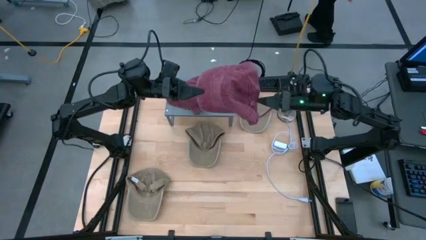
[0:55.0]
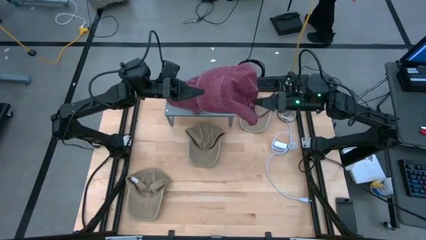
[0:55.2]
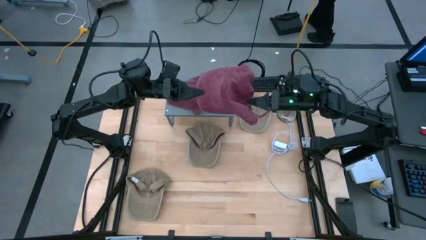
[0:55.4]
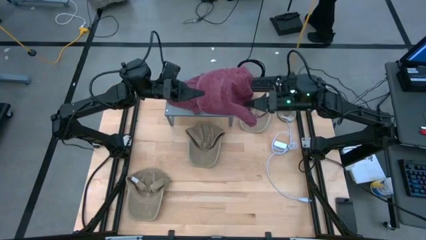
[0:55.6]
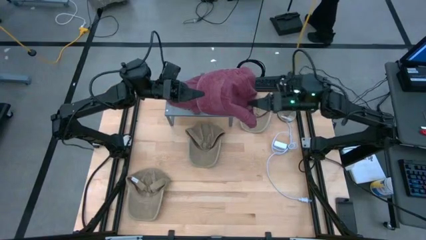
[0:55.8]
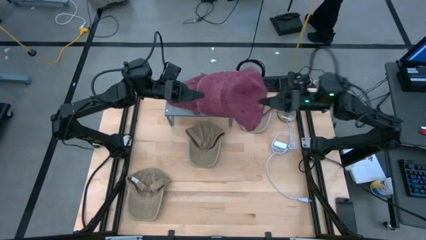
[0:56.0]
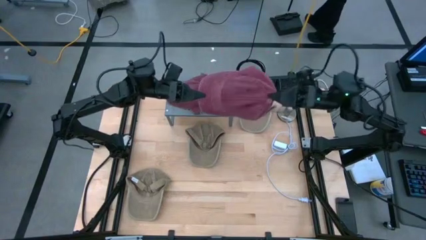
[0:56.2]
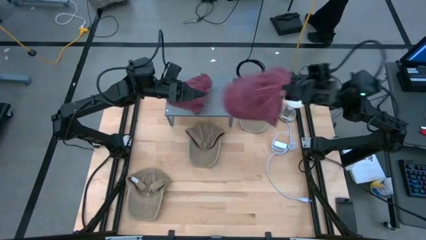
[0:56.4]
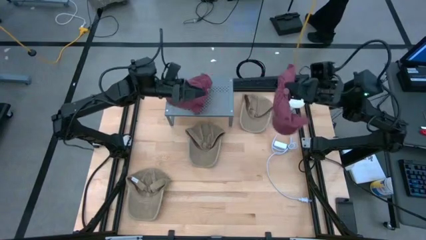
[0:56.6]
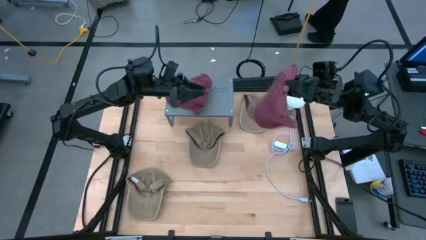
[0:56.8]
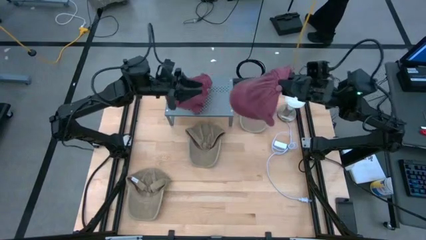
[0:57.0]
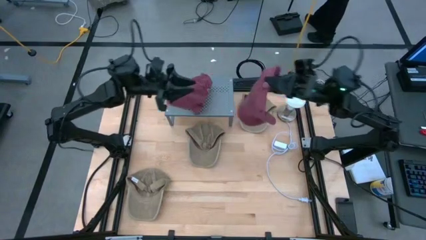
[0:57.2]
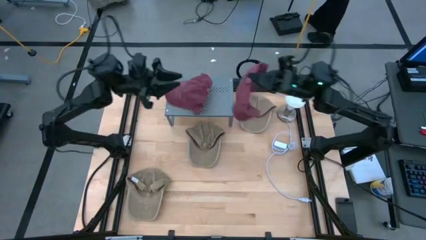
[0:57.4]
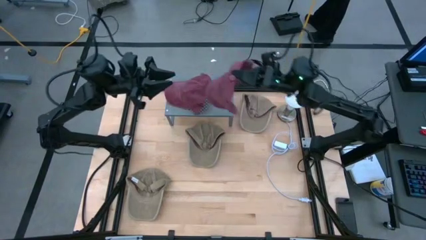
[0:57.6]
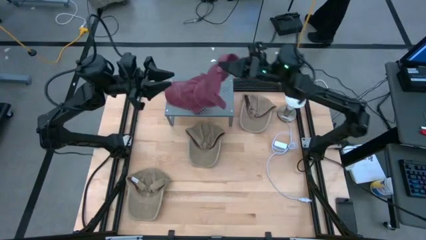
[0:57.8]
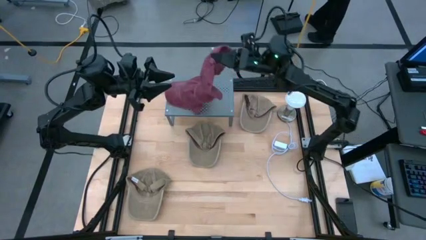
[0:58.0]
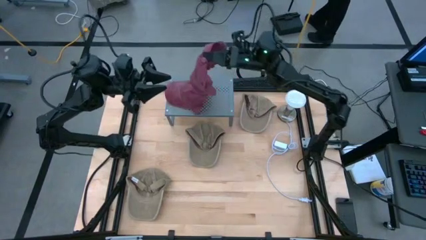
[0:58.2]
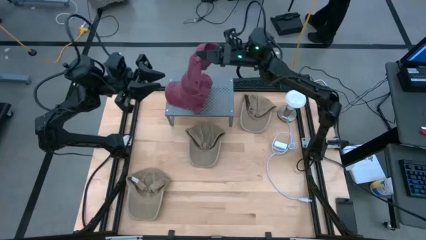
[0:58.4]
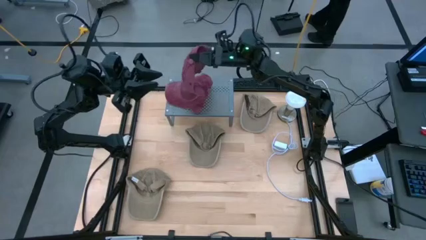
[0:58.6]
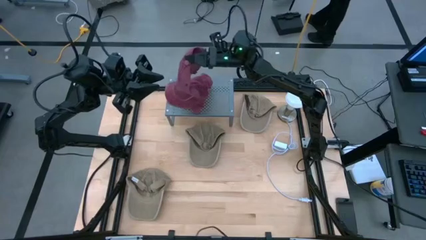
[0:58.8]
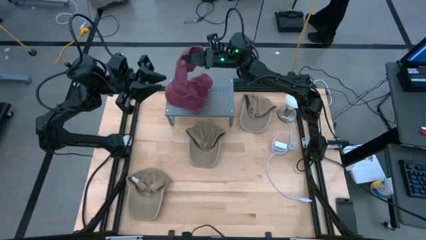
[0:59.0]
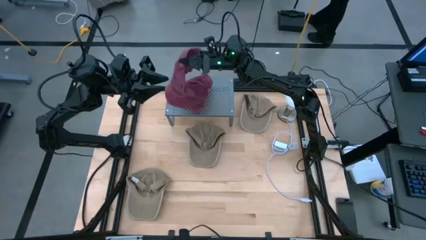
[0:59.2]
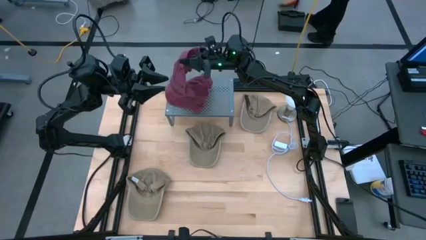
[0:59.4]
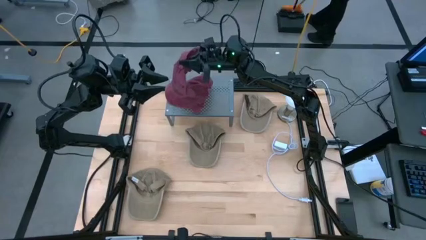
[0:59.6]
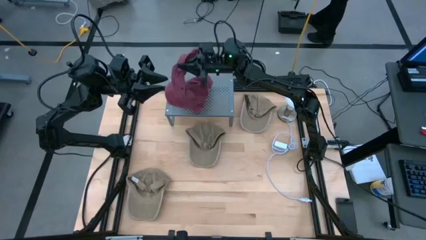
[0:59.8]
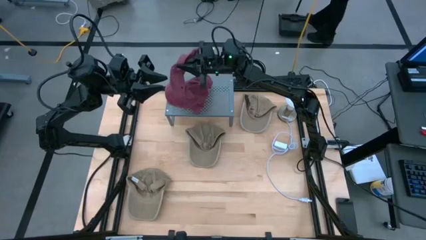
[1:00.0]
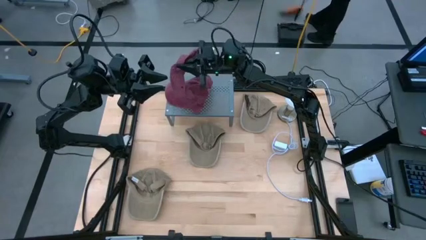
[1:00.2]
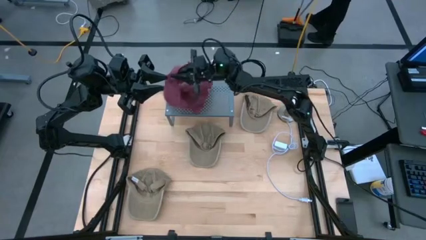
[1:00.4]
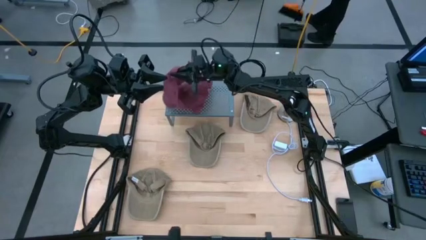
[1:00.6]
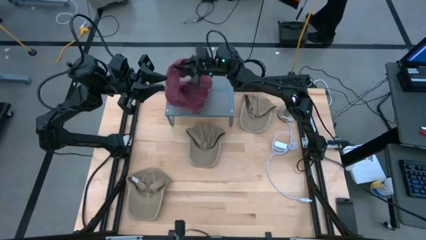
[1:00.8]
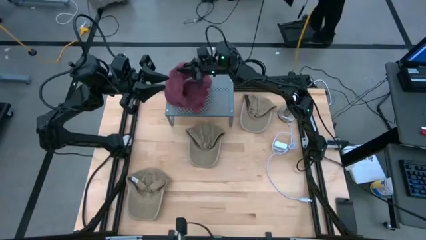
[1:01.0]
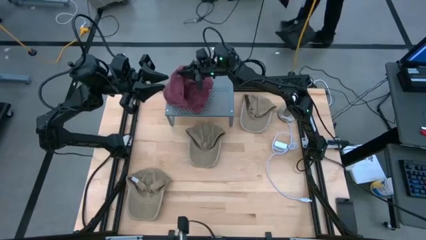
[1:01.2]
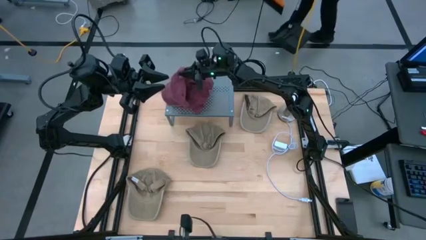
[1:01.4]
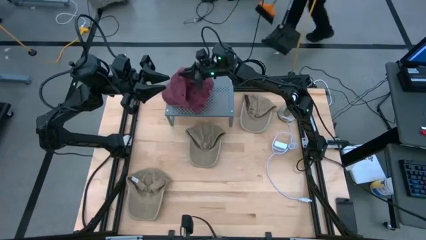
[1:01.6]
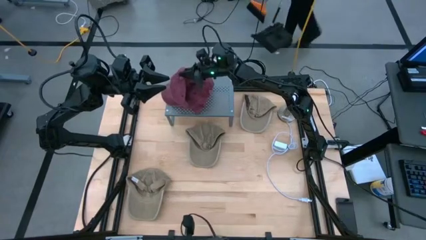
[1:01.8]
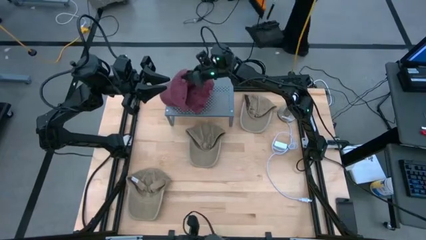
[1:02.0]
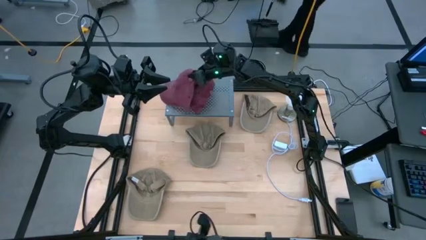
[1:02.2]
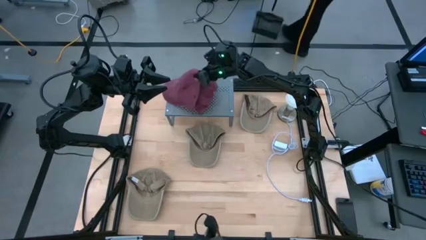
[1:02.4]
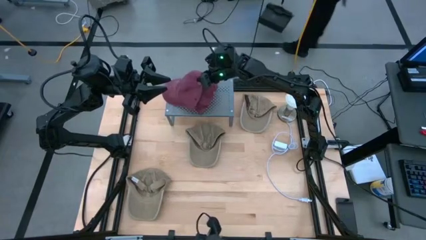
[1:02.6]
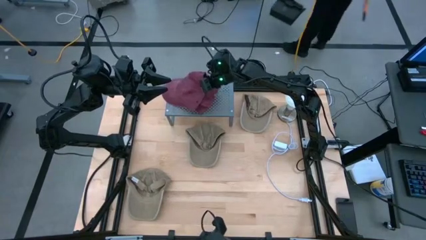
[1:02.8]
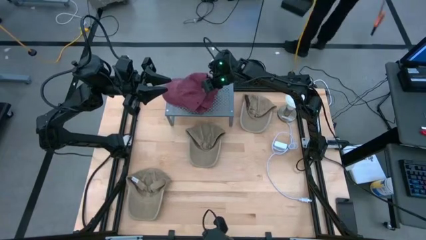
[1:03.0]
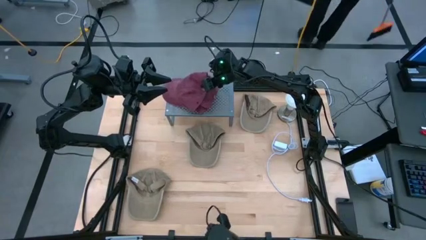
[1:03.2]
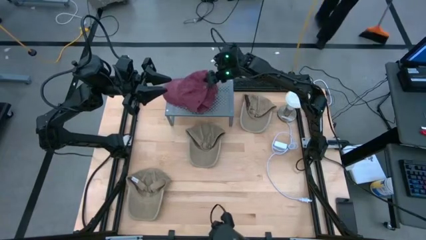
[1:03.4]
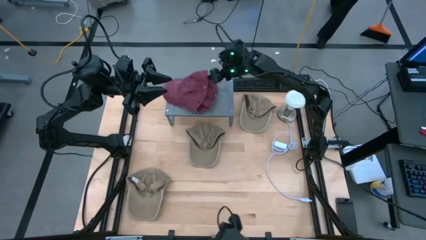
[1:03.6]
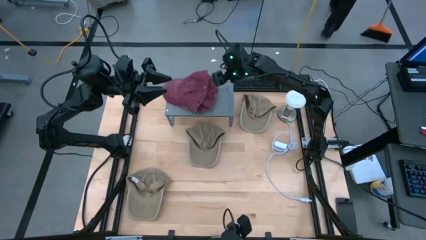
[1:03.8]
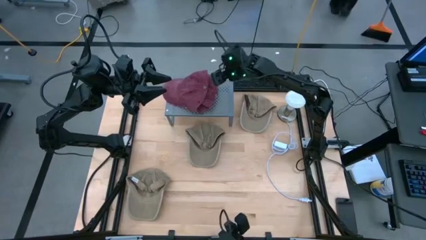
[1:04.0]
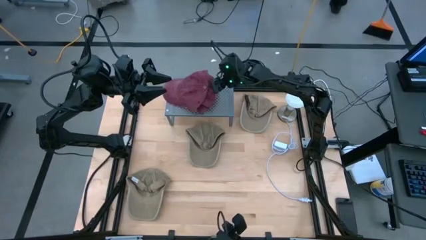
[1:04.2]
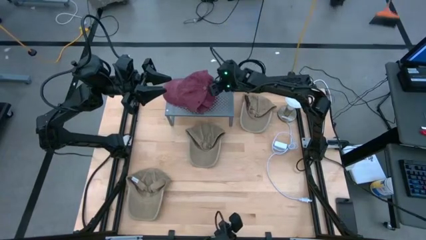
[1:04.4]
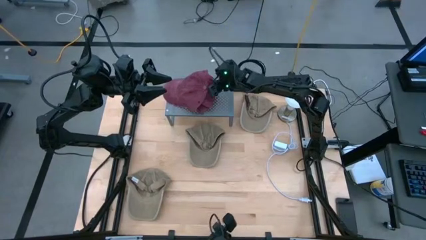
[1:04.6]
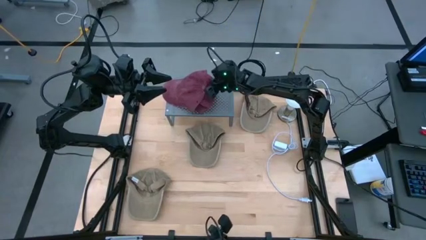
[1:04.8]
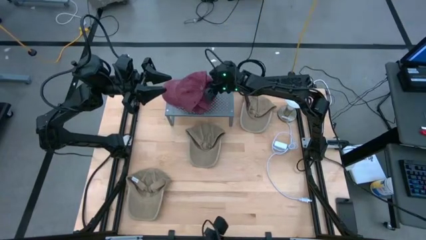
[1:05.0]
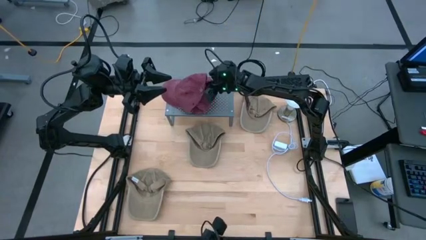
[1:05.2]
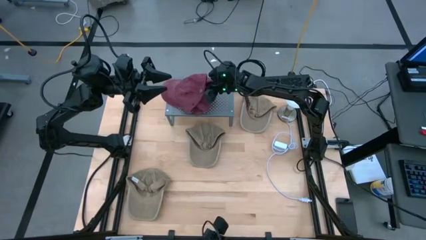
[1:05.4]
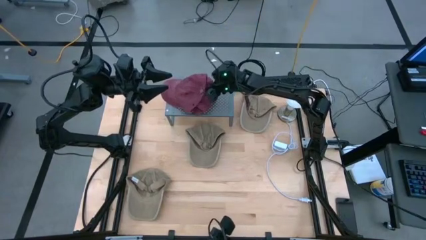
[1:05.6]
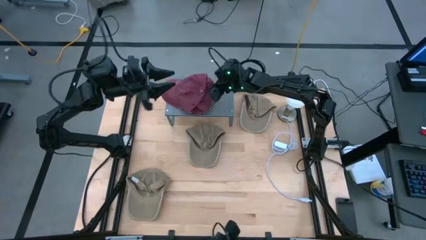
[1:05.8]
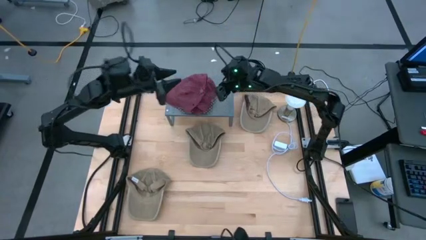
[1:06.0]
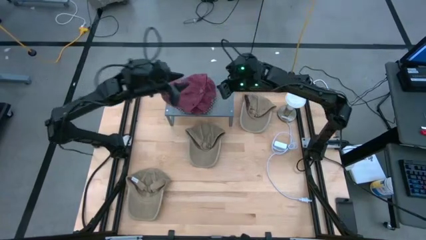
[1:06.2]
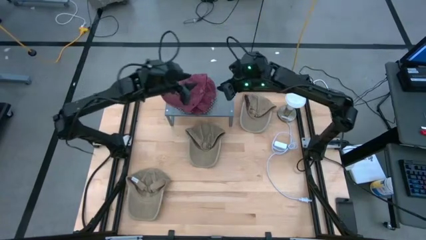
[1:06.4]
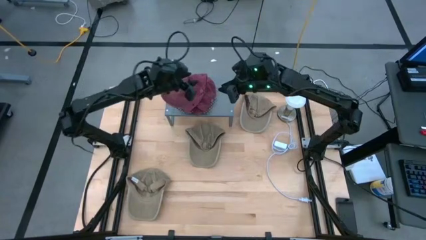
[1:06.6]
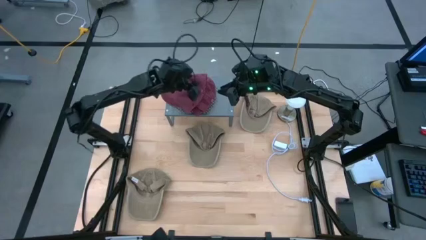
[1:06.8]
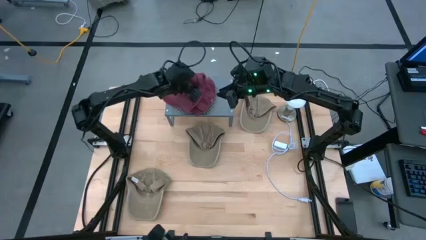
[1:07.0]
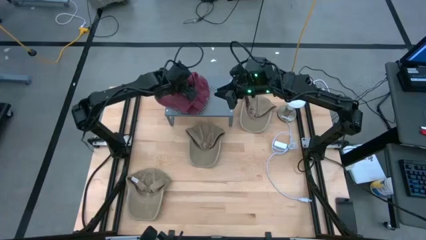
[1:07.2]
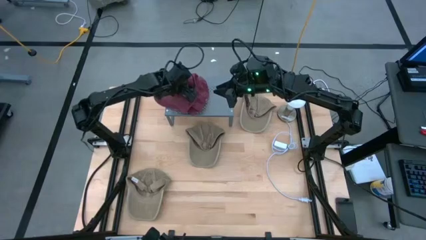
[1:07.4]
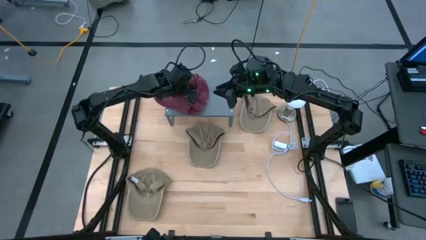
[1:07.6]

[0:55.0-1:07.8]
Task: Pick & Place hat
Stack the dark red cap on the dark red cap on the shelf

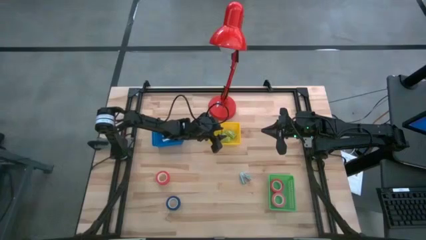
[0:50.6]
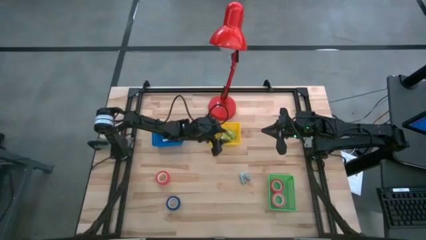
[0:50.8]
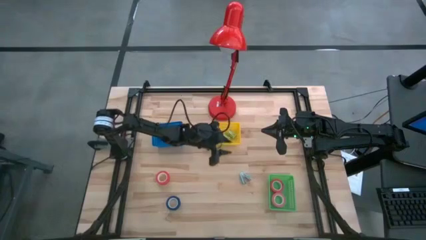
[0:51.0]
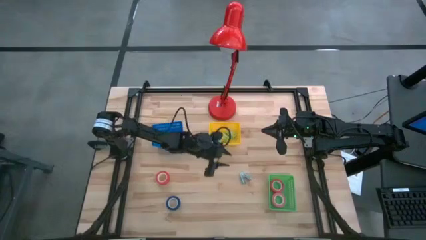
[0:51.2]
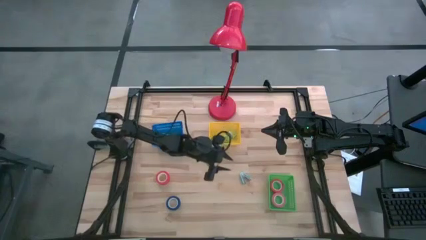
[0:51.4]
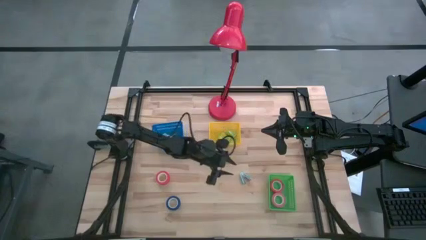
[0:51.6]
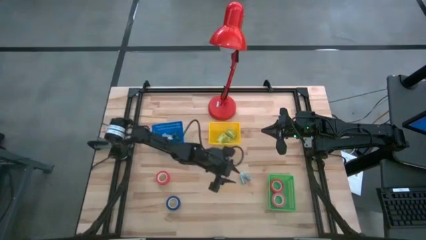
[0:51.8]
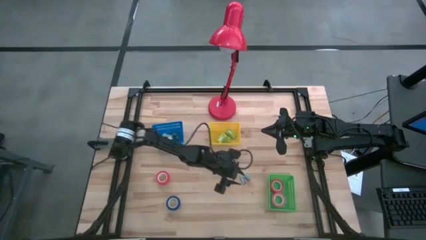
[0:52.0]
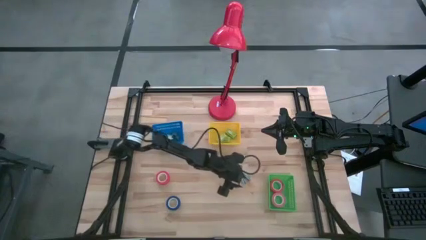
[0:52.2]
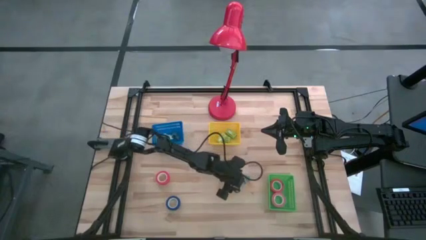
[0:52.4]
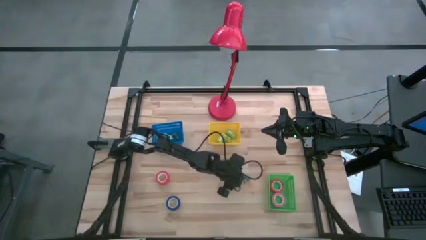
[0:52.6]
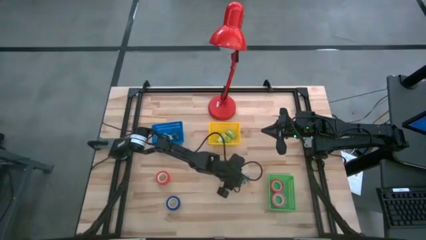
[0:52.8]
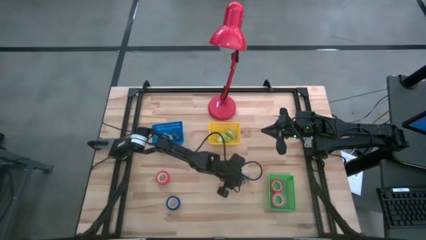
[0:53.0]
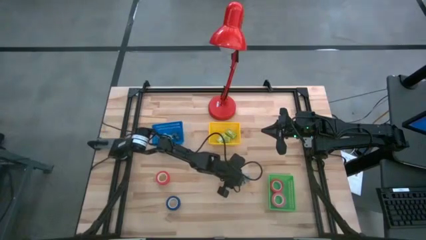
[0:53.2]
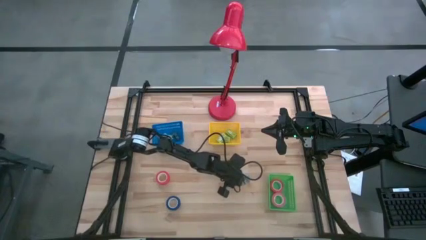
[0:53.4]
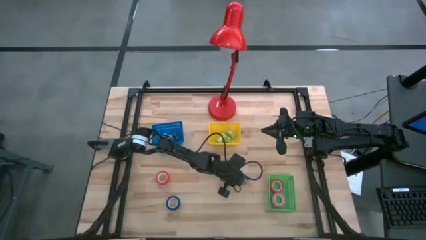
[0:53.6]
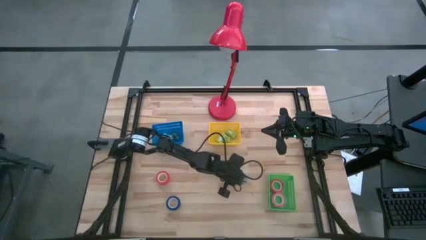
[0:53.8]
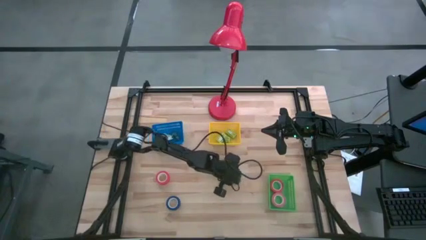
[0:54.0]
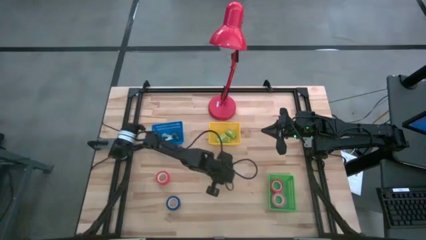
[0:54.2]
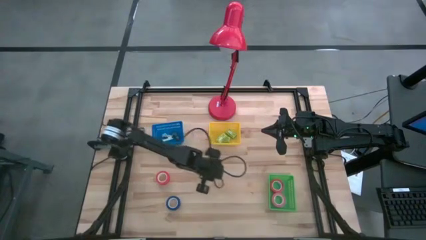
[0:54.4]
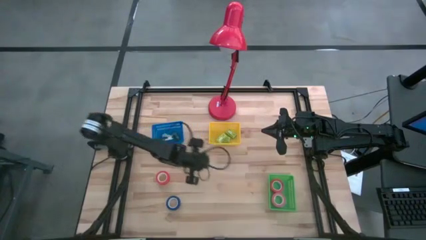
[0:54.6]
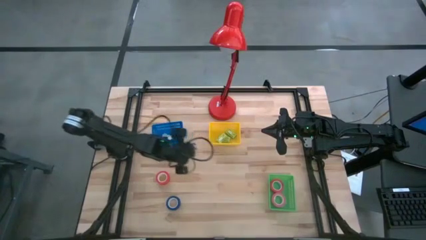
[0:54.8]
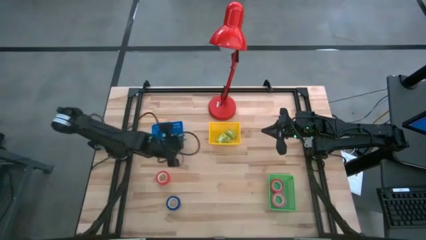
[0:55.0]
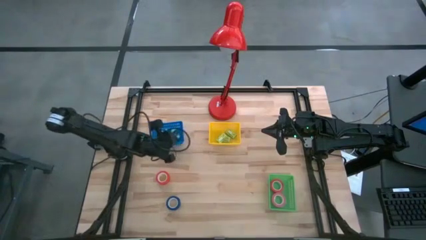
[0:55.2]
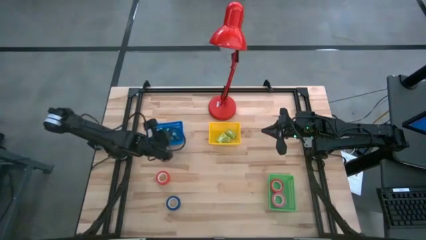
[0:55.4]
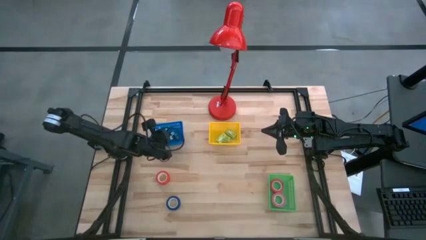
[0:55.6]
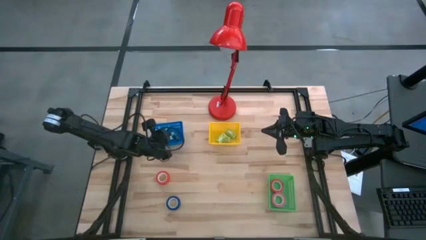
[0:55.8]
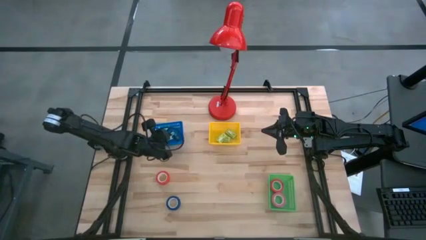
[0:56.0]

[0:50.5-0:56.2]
Task: Pick and place Stapler, Stapler remover, tape
Put the light blue staple remover into the blue bin
